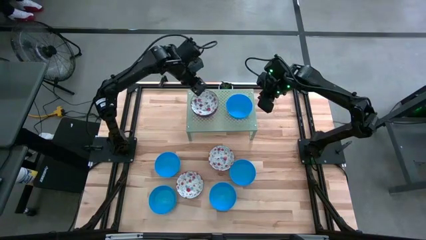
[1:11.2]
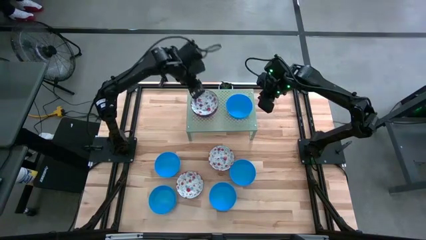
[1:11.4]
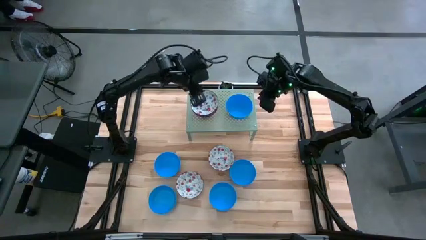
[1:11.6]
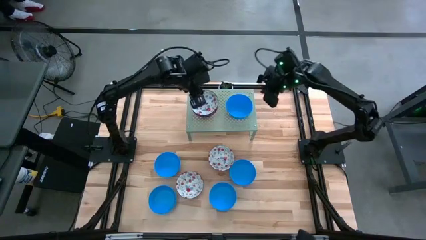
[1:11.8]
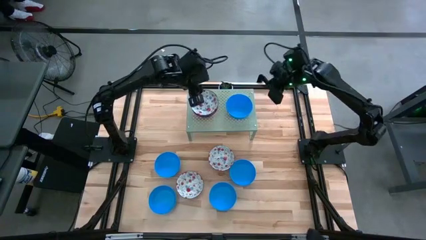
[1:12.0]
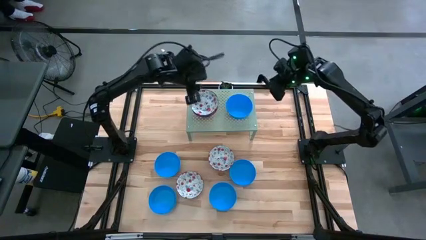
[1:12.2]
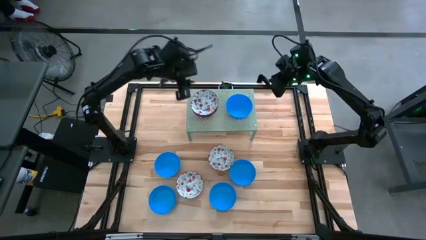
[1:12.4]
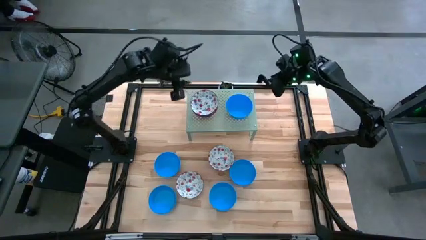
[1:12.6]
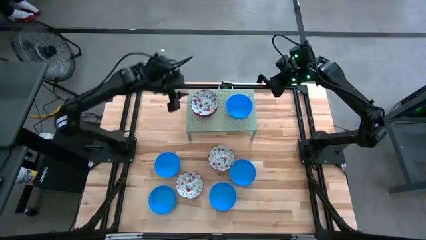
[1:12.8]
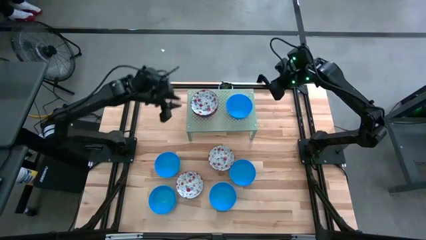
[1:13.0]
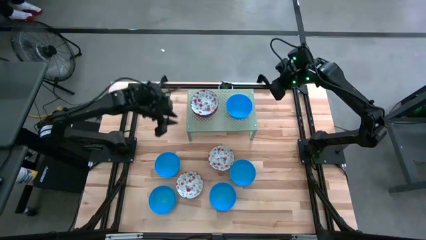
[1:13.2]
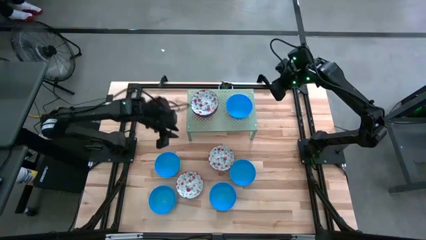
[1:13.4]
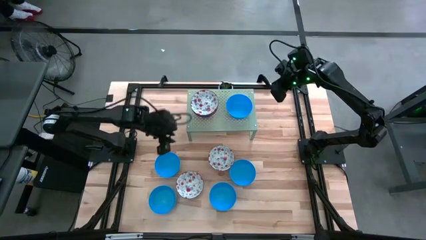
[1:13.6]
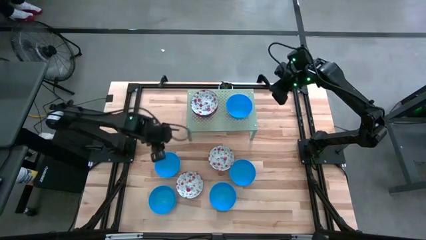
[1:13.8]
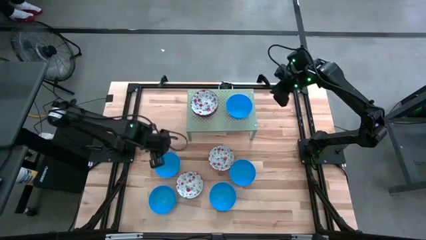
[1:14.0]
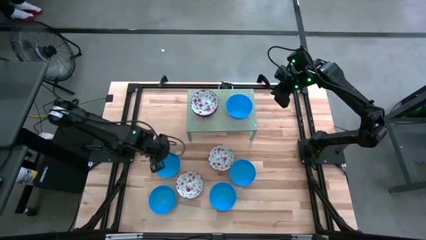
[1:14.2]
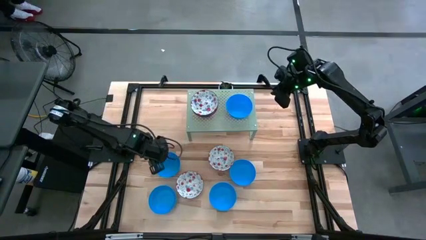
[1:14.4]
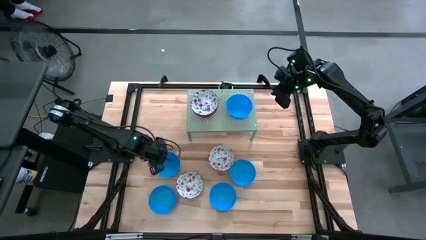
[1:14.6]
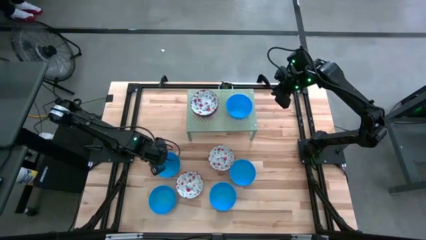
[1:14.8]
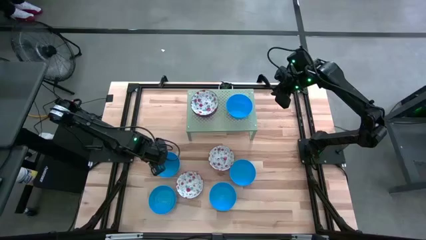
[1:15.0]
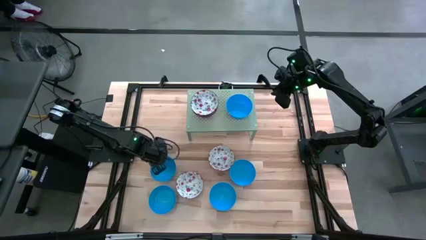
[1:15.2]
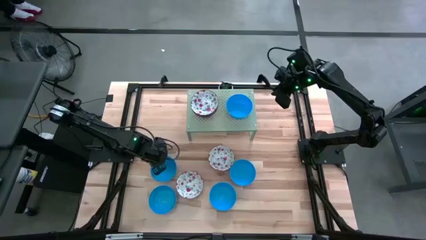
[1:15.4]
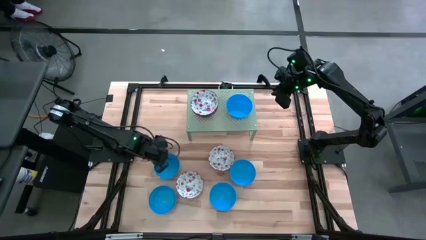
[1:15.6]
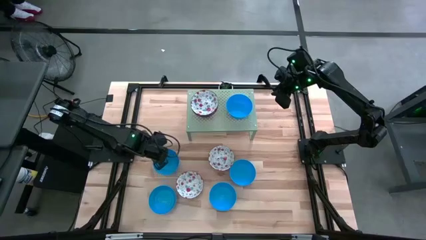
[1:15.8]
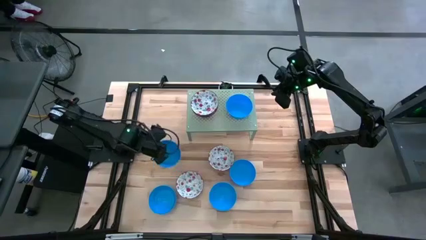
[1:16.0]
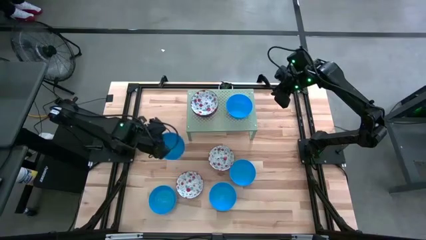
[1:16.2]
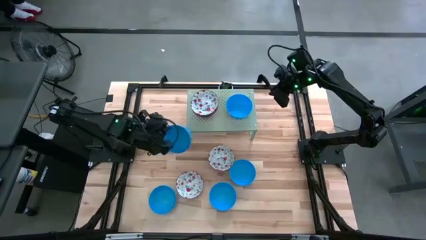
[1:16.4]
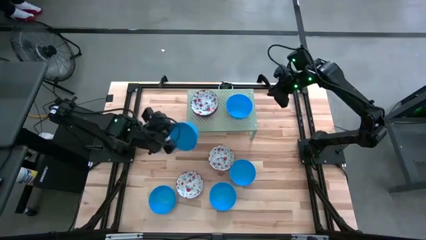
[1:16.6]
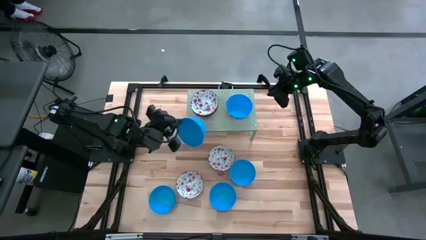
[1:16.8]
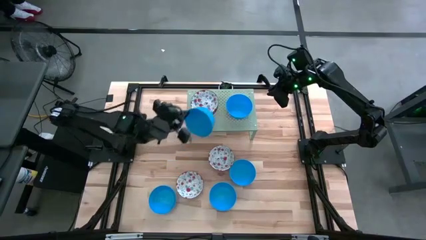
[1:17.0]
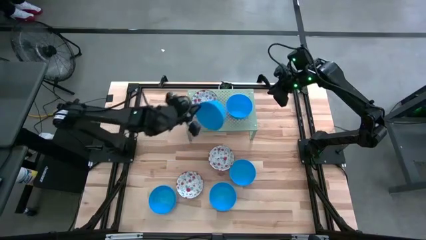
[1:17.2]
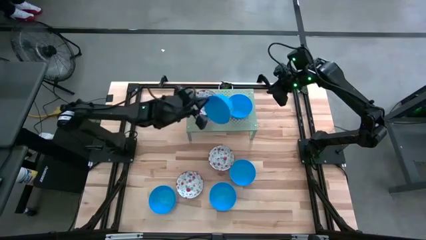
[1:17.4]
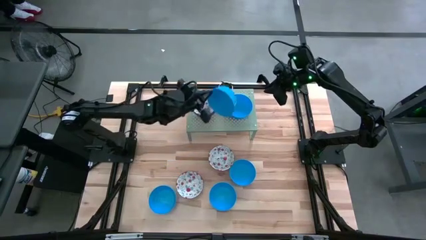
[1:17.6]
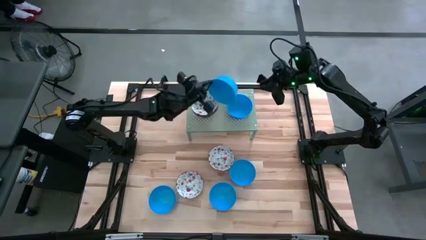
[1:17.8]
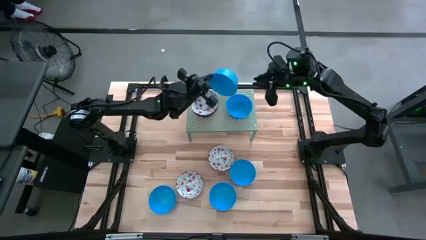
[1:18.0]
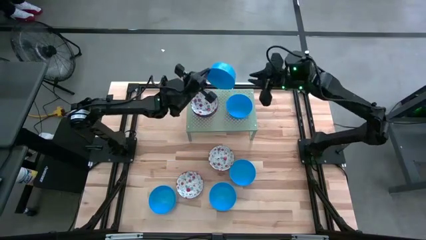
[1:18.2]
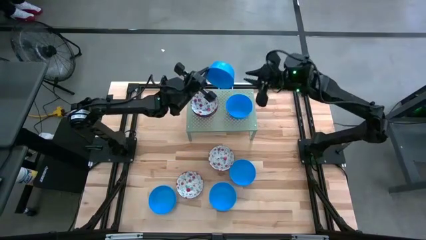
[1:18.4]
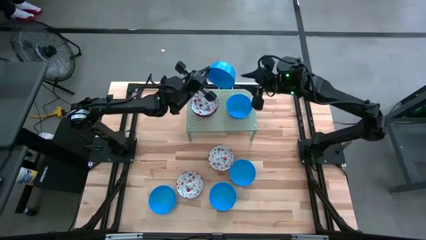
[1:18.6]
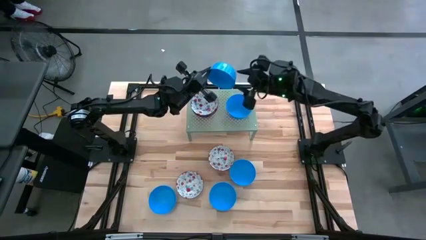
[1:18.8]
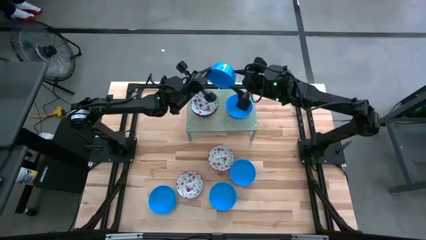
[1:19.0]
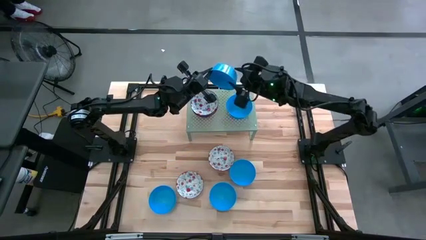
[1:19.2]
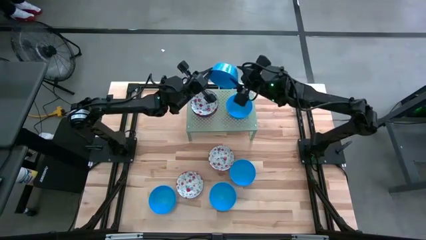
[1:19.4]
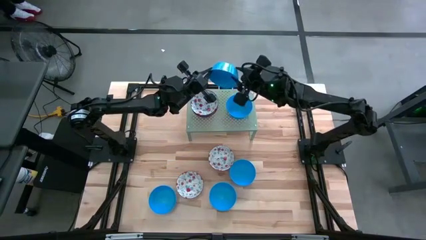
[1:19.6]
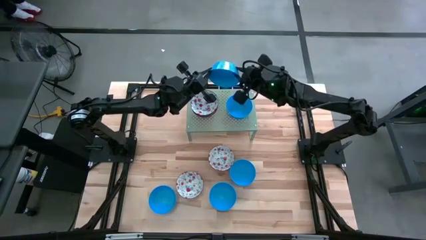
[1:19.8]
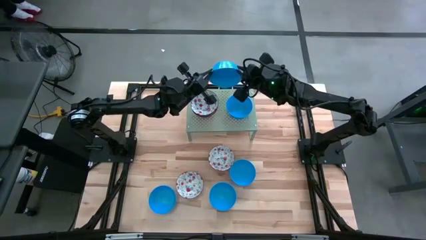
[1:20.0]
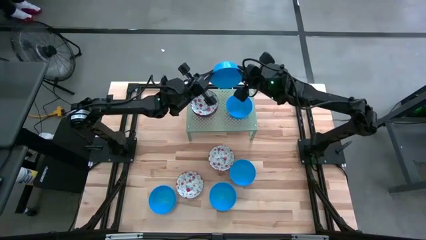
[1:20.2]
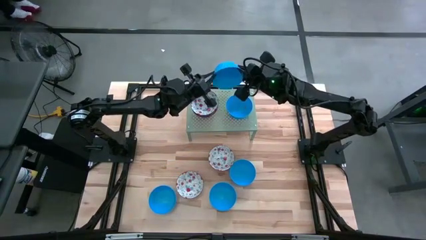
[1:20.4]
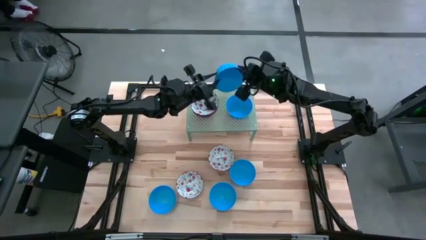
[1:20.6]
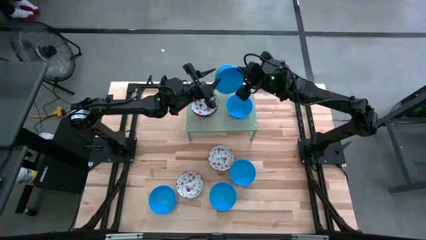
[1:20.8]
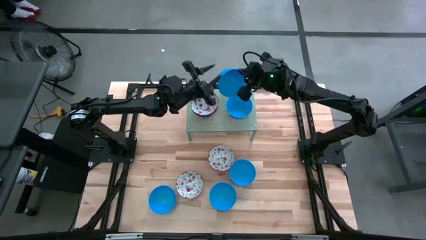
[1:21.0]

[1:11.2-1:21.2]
Task: Pick & Place Mini bowls
Stack the blue bowl on the blue bowl on the shelf

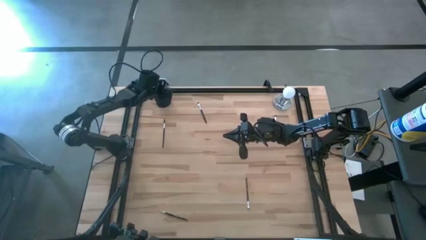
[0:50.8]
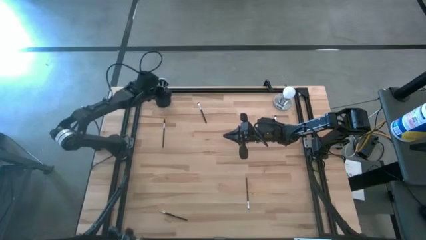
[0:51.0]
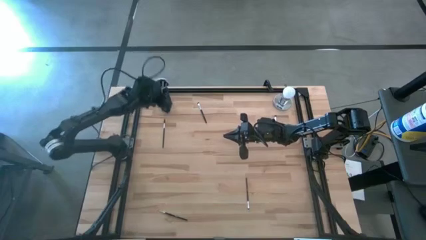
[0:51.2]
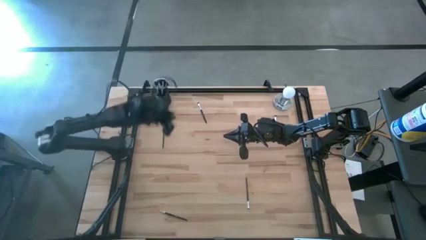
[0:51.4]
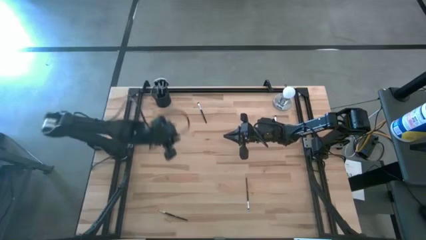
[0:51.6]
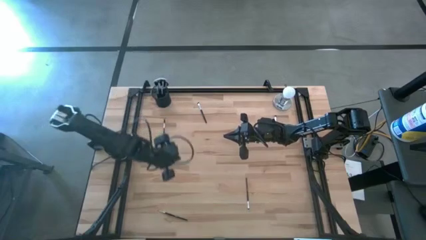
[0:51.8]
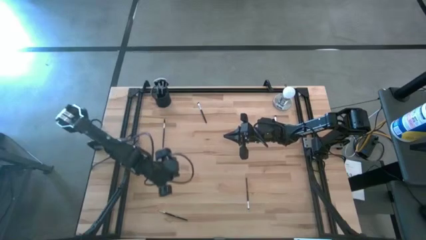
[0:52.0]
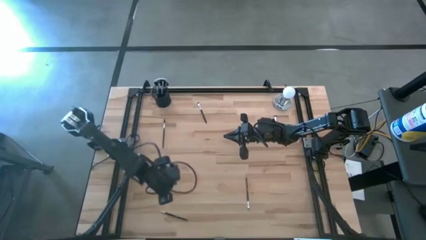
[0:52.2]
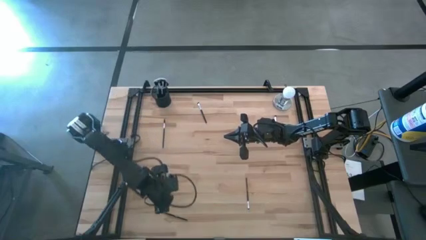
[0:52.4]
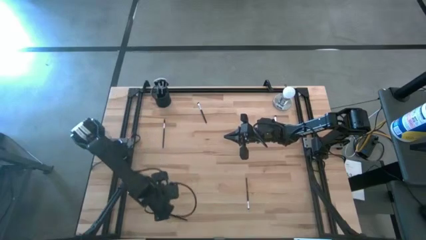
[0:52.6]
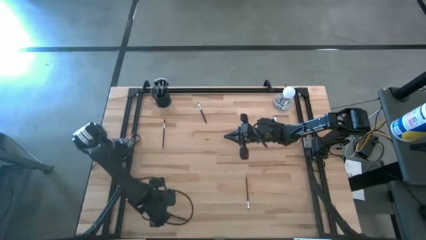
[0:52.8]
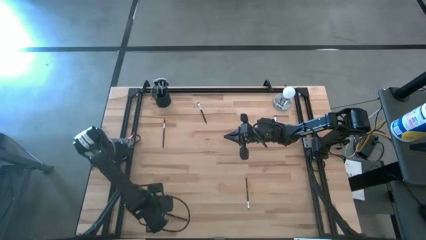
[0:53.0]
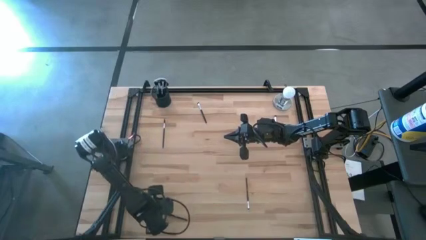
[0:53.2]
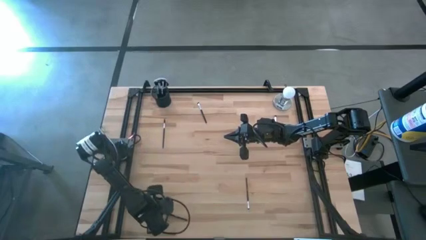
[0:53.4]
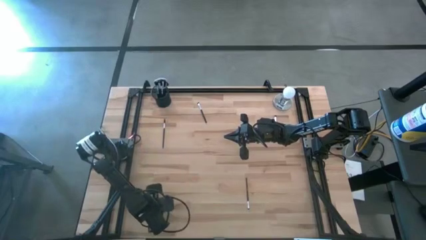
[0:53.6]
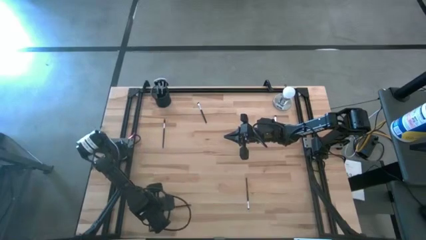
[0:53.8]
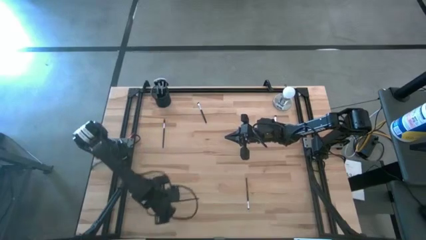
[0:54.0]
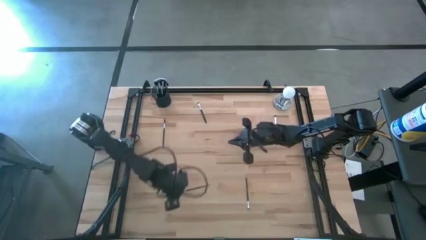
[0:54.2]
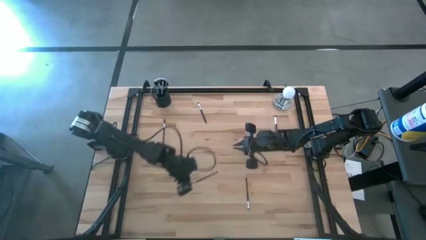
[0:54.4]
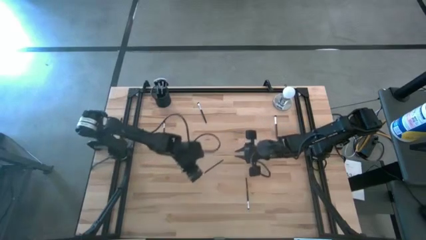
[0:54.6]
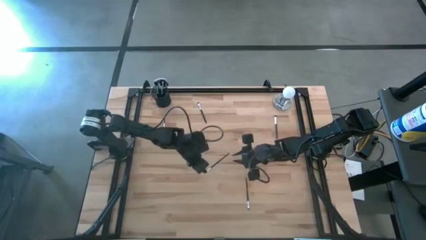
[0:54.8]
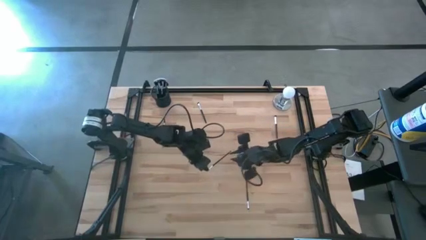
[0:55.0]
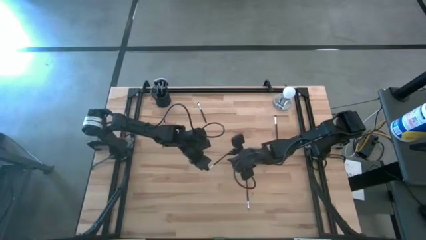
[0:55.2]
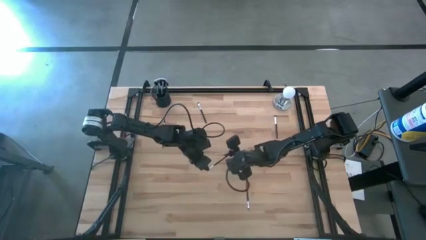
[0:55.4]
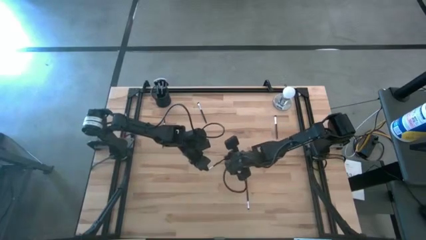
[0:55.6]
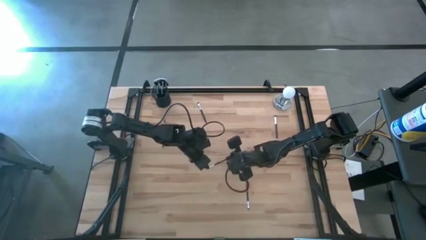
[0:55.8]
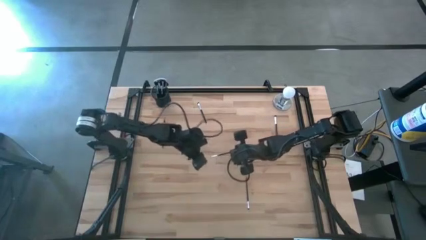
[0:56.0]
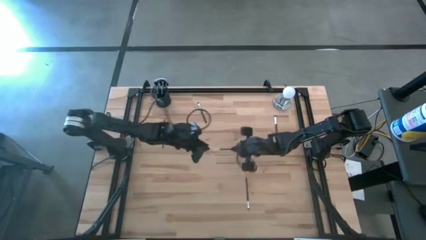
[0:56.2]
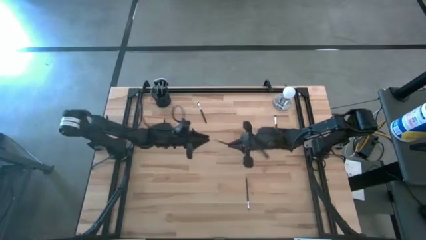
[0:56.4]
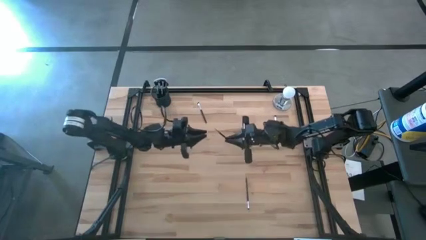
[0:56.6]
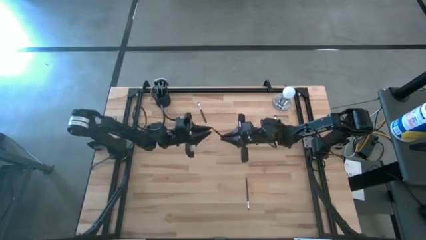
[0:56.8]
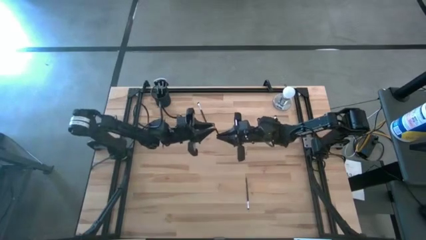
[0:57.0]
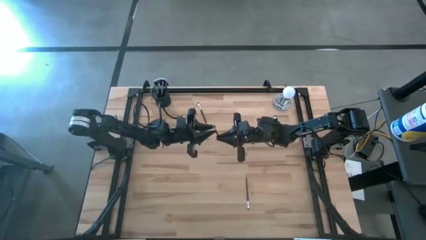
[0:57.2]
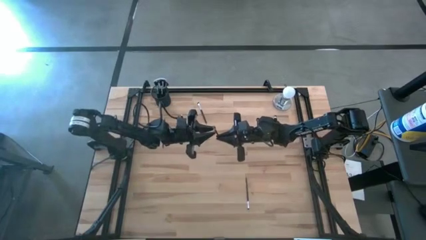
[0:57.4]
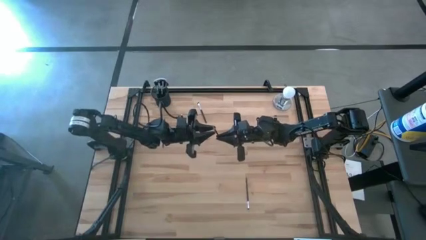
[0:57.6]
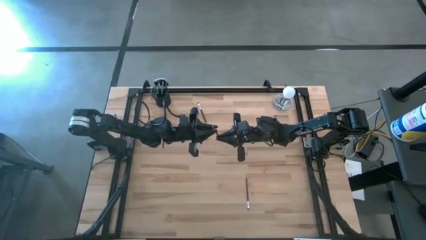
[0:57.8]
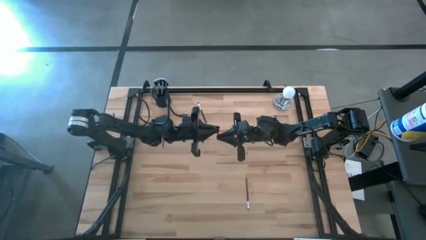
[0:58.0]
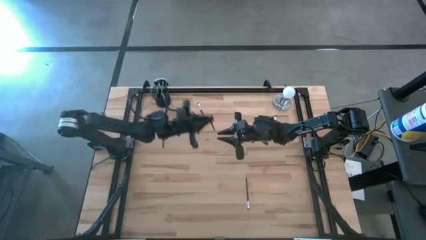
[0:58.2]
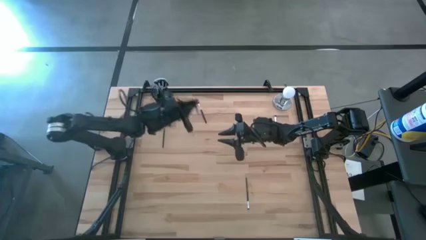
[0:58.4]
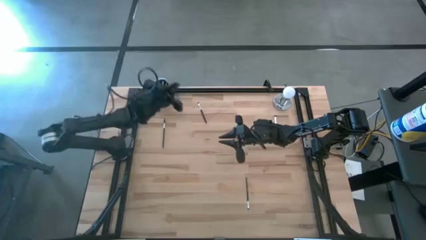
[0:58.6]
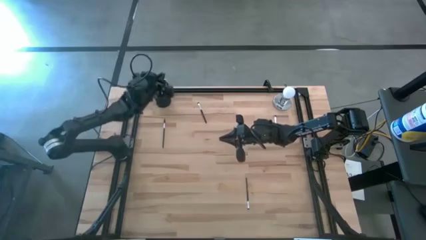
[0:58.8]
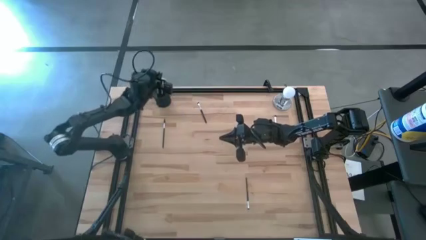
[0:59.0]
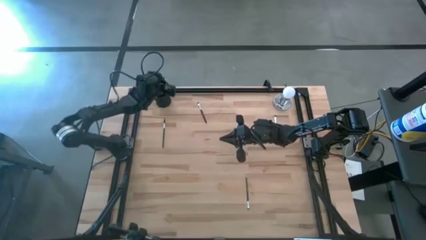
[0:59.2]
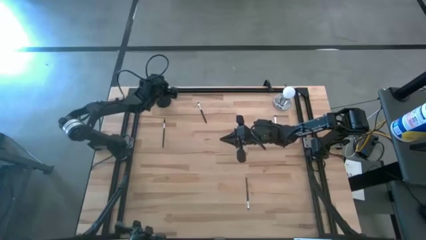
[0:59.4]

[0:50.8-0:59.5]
Task: Put items in baskets/containers
Put the liner brush into the pen holder
